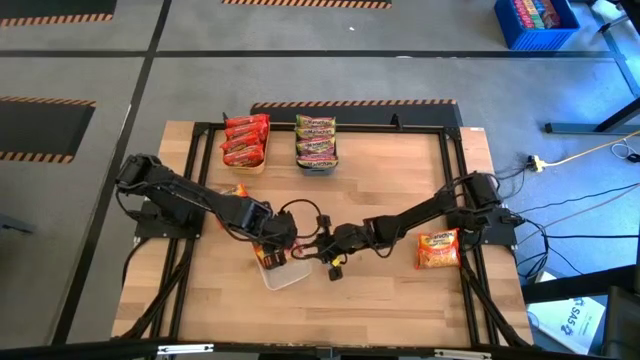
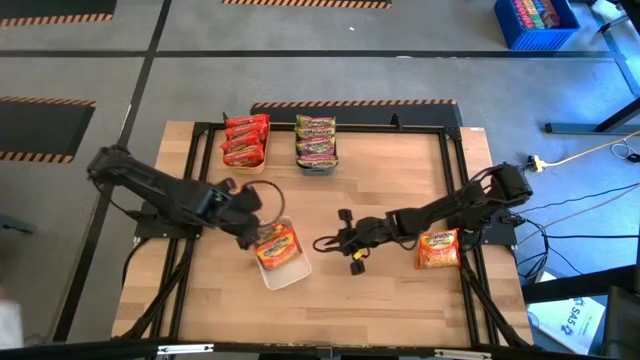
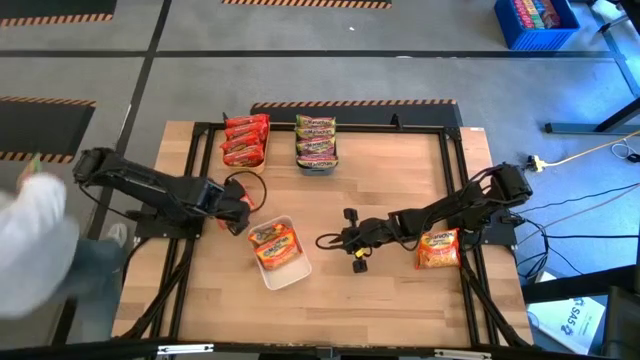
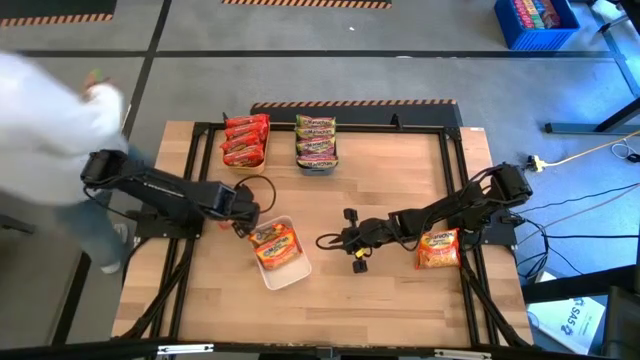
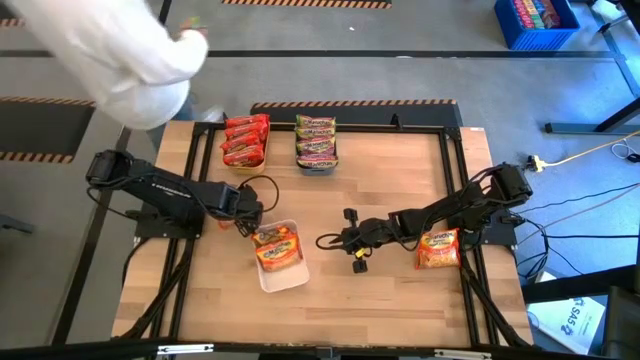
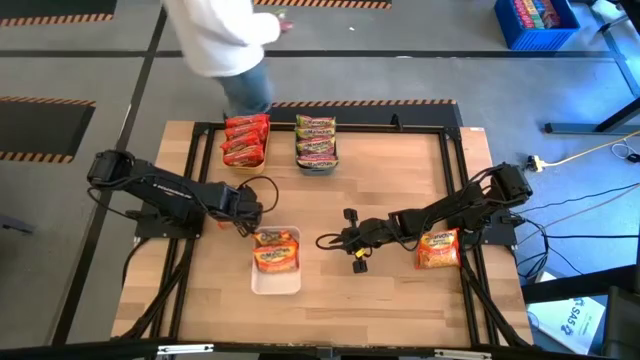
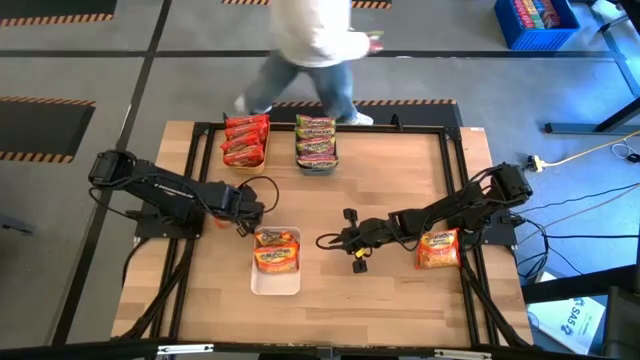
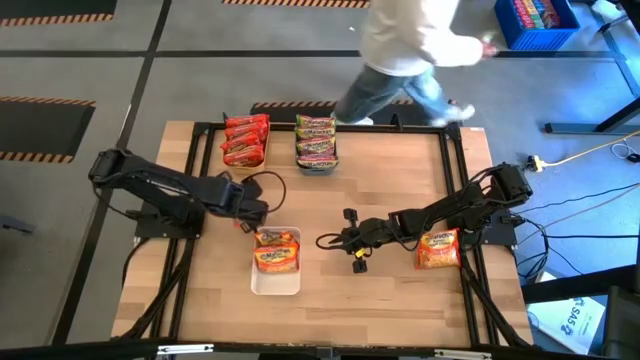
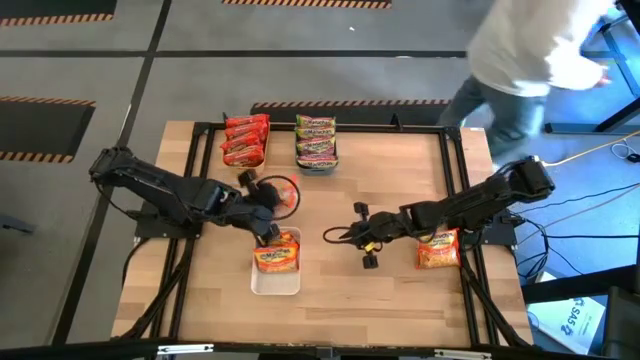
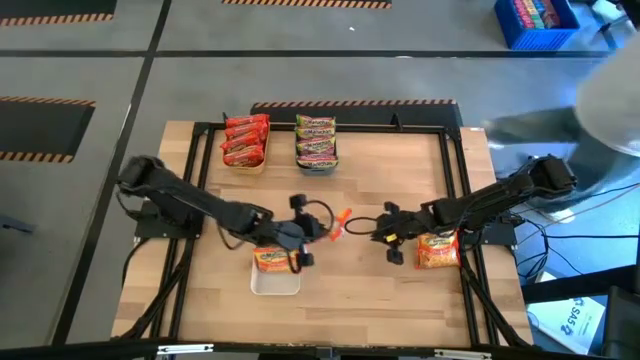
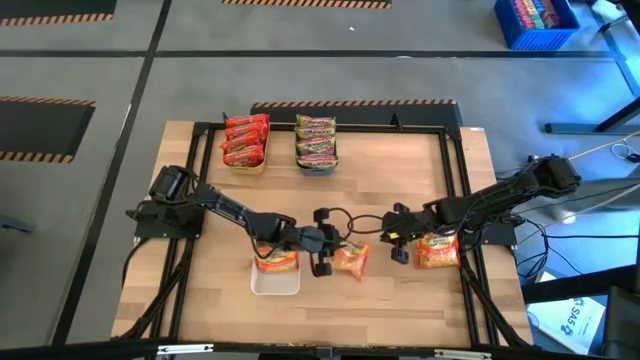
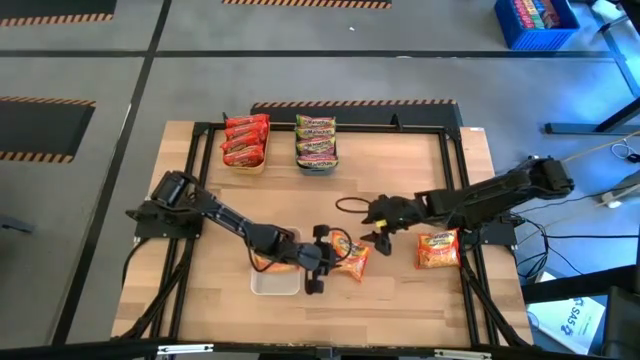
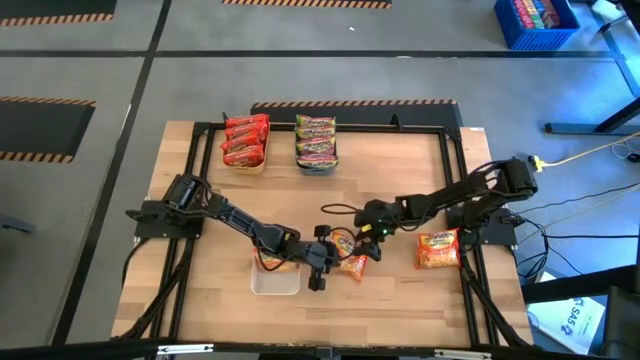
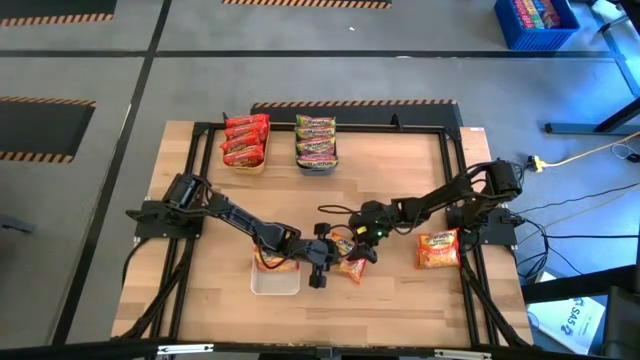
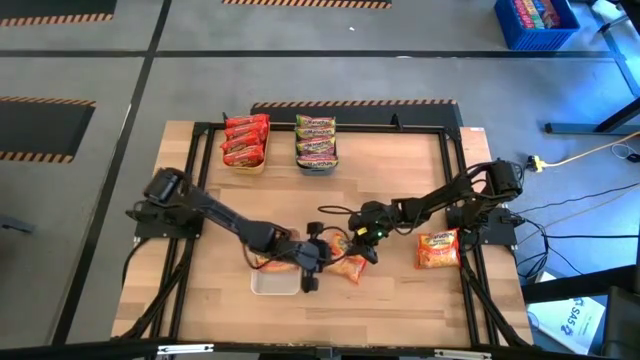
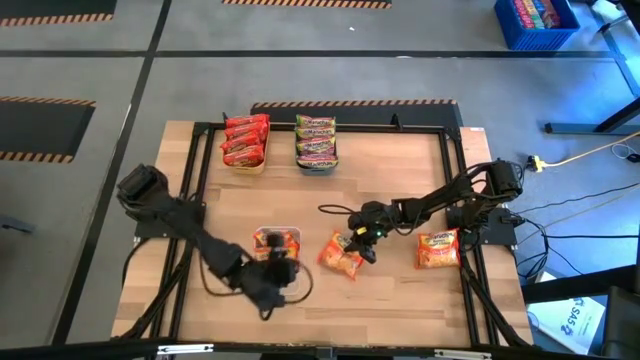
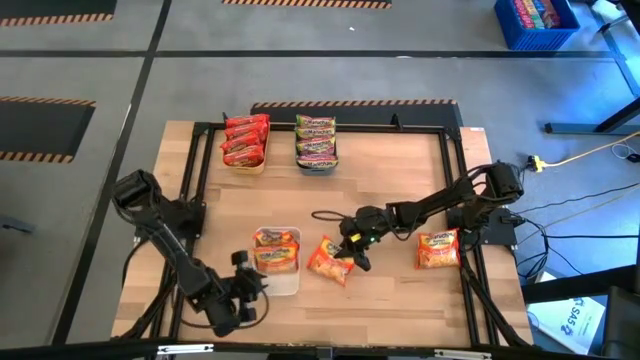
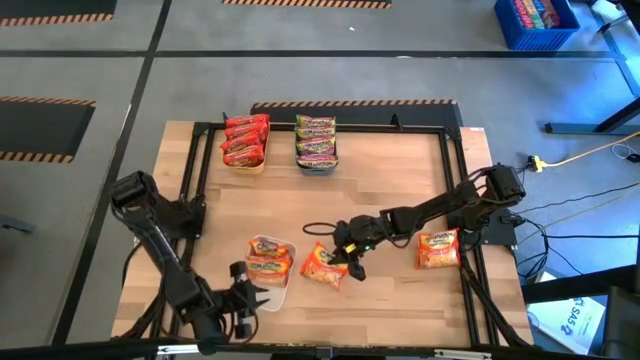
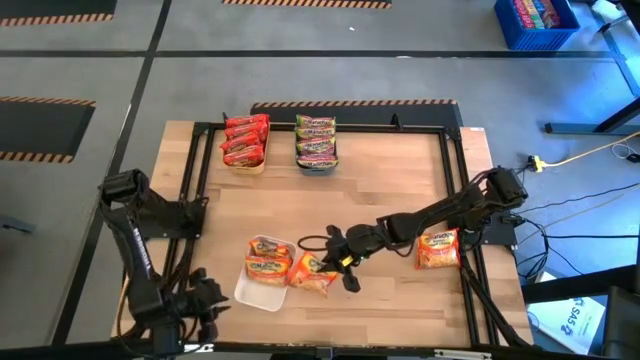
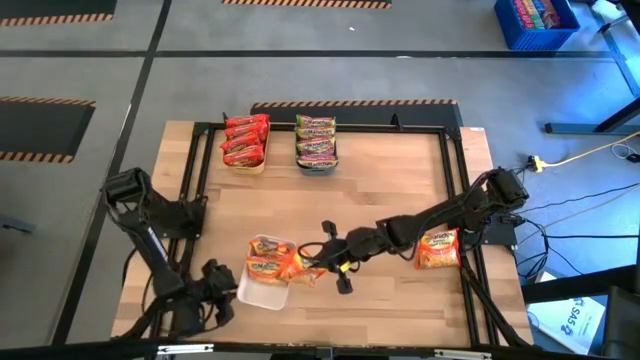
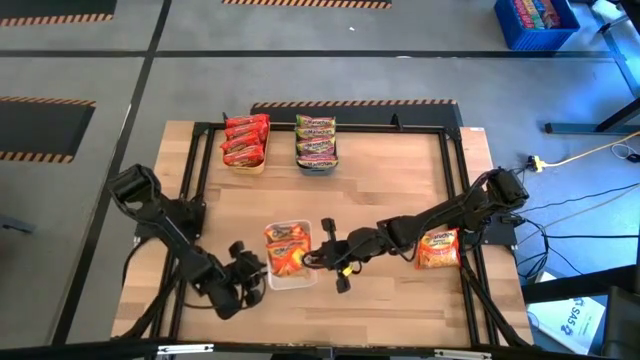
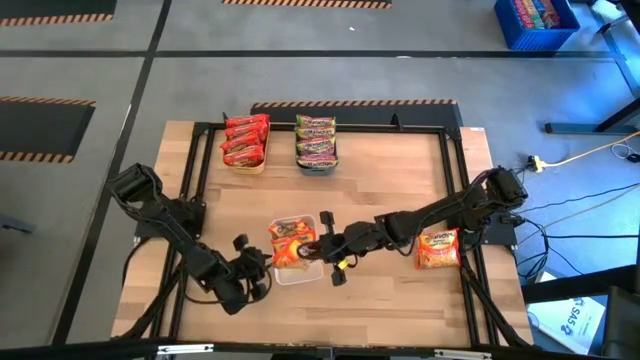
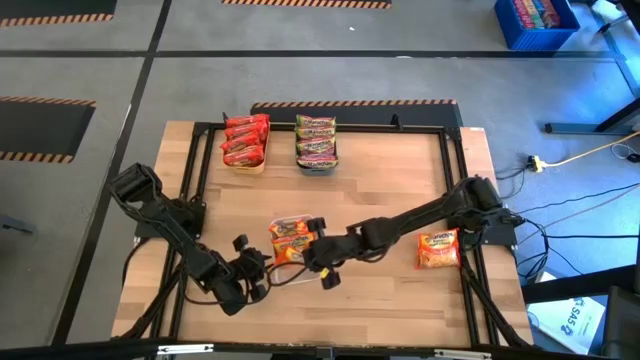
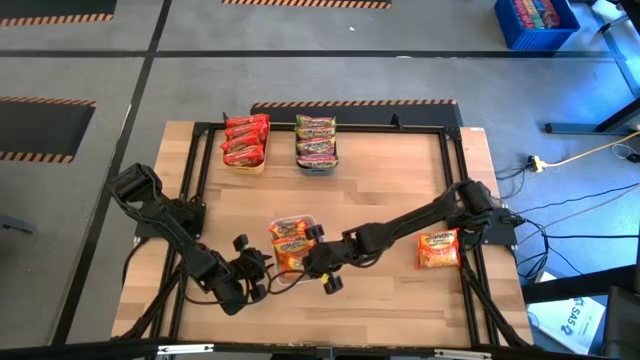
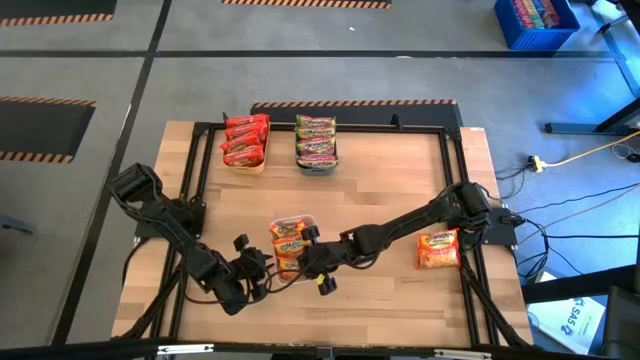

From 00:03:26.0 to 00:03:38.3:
Task: Sort Maruchan noodles
Put the yellow noodle pack into the white bin

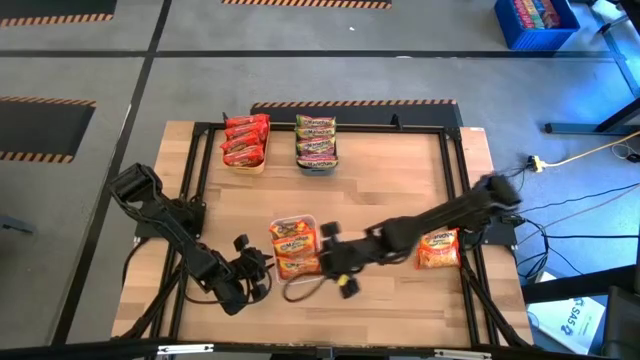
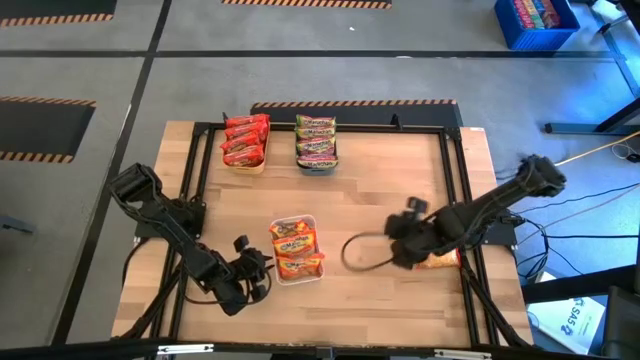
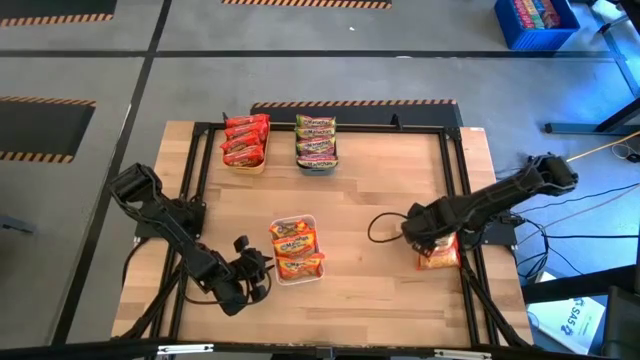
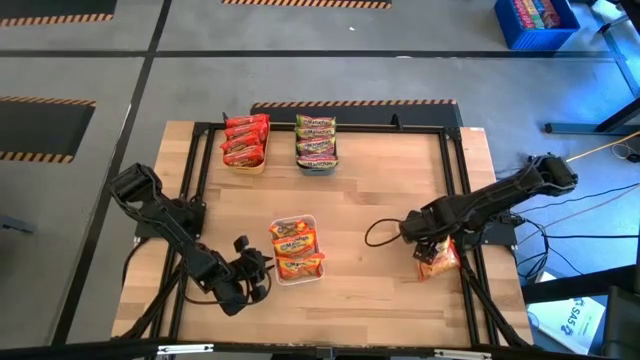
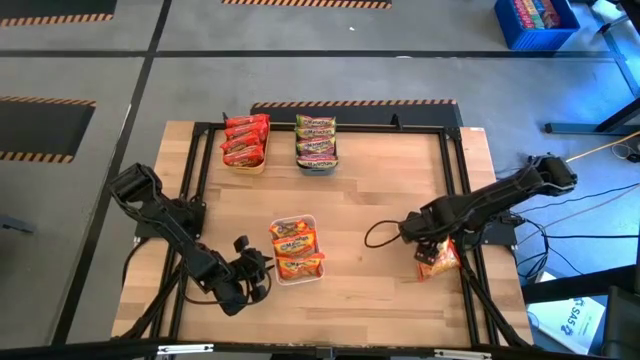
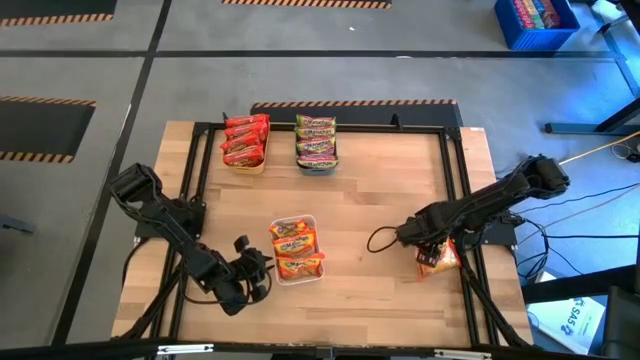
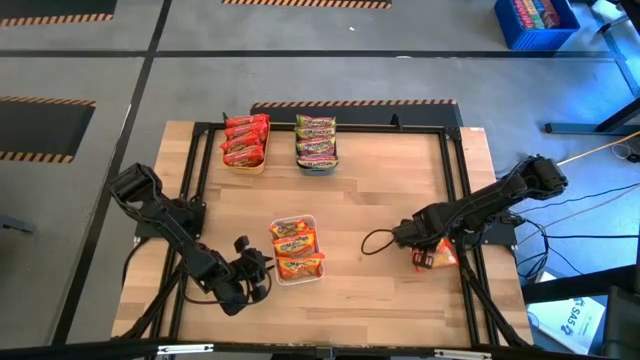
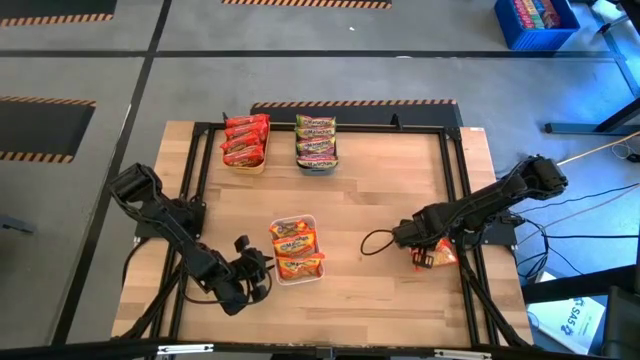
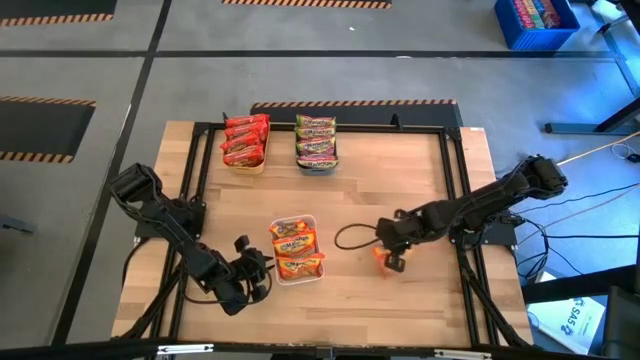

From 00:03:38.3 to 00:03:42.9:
Put the yellow noodle pack into the white bin

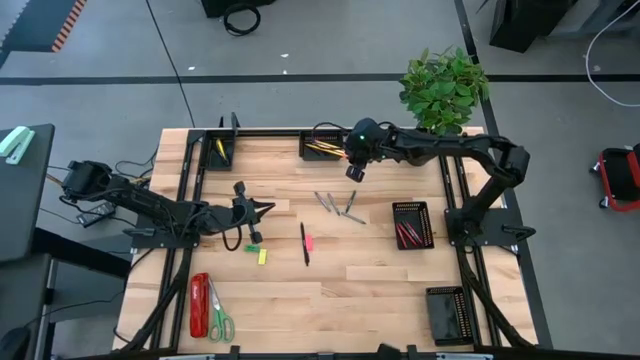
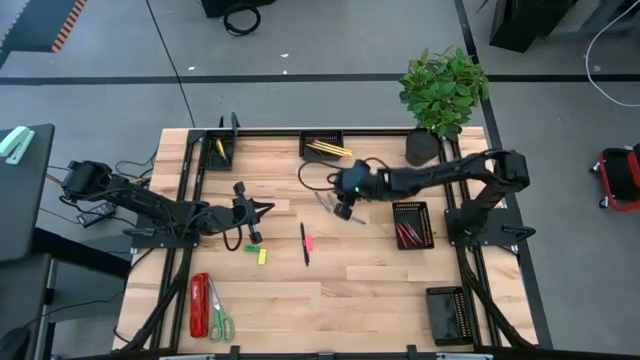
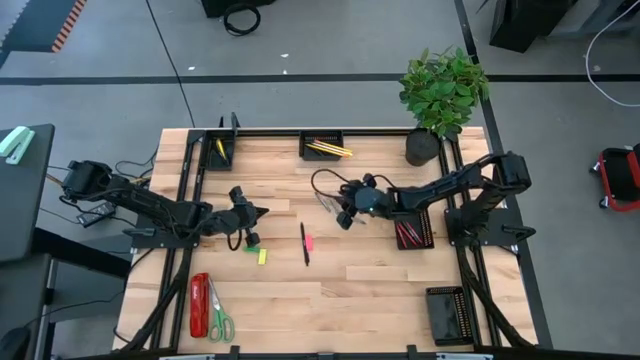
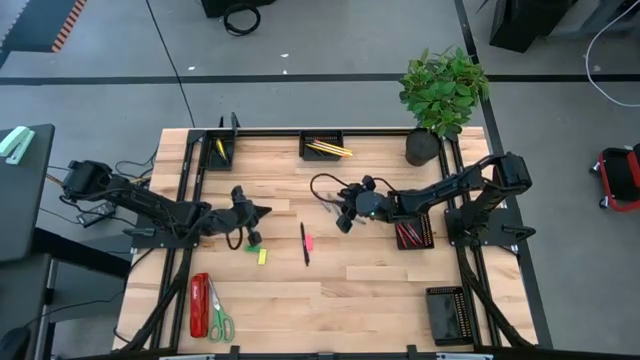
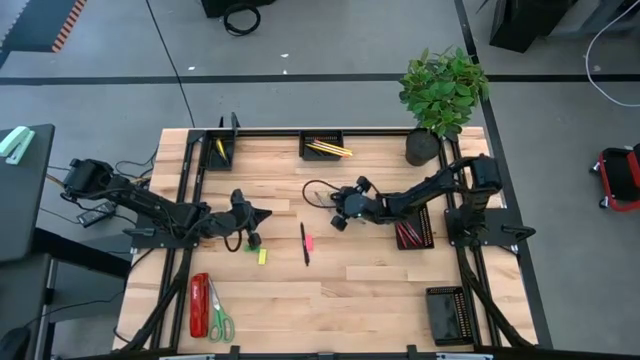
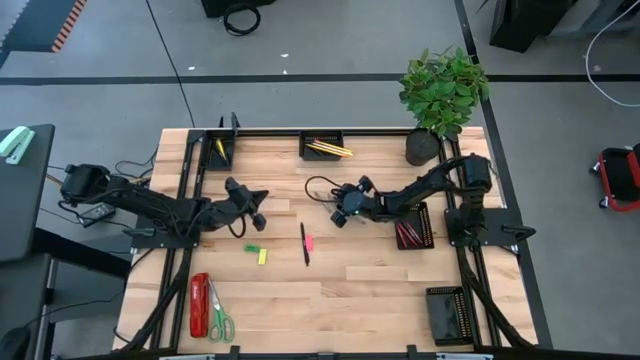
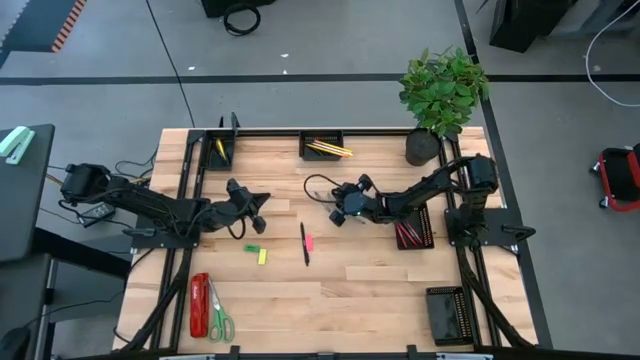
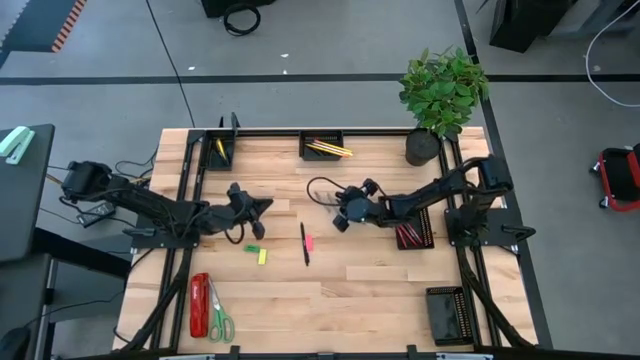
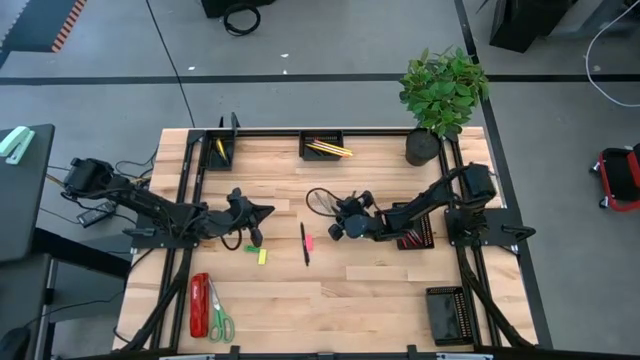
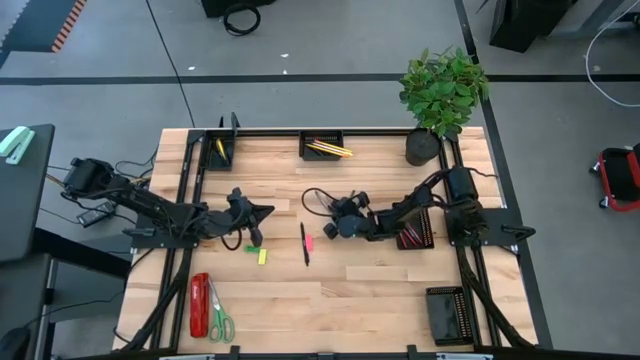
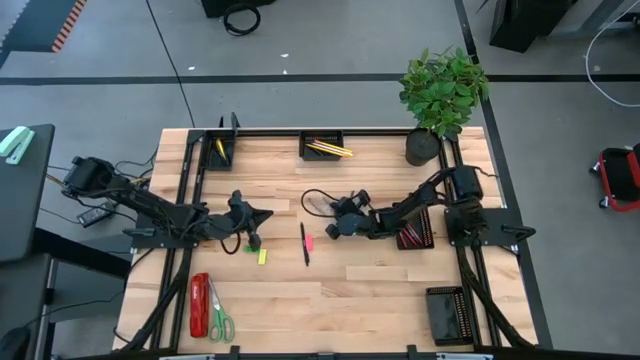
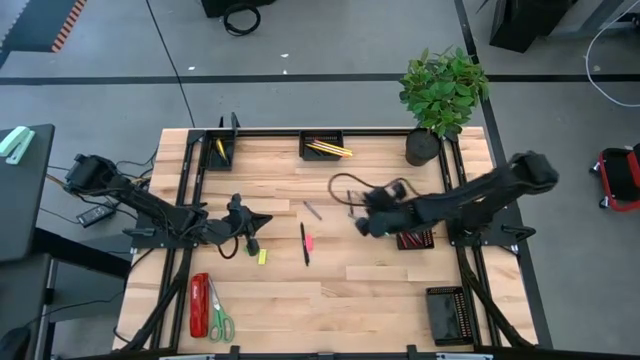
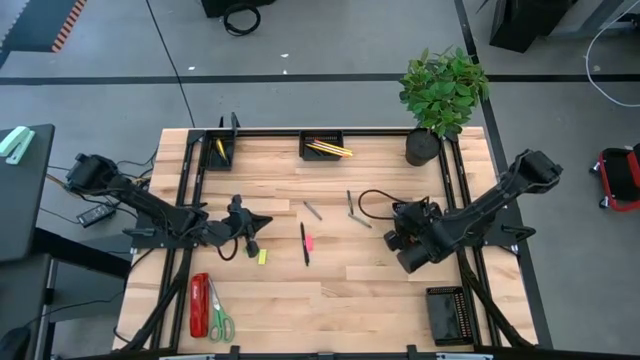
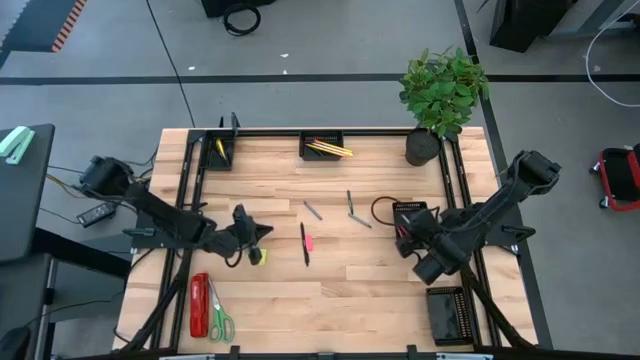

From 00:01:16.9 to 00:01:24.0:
Task: Sort crayons/erasers/pens/pencils in bins
Put the gray crayon into the middle right black bin
